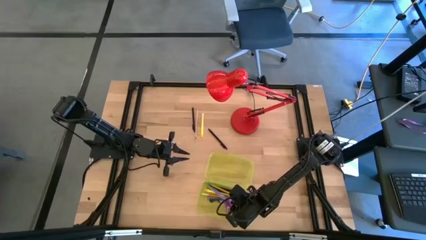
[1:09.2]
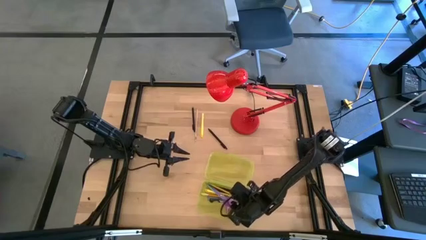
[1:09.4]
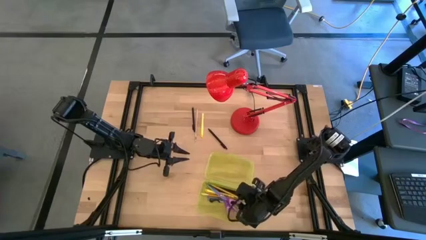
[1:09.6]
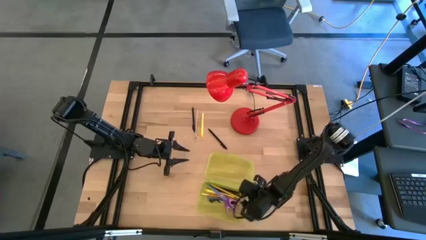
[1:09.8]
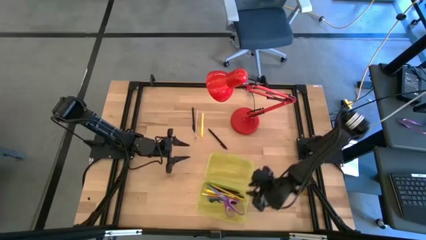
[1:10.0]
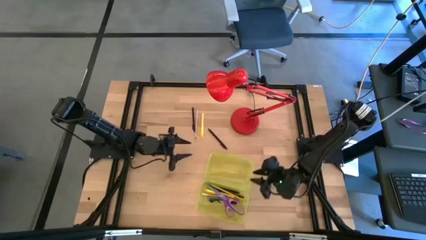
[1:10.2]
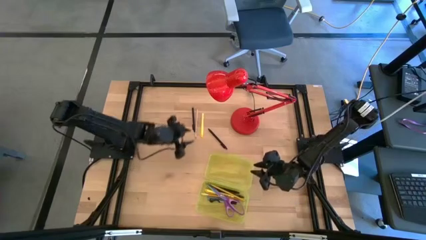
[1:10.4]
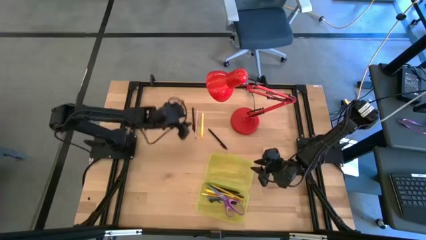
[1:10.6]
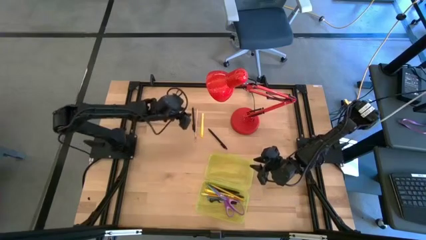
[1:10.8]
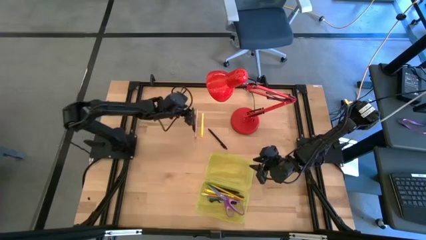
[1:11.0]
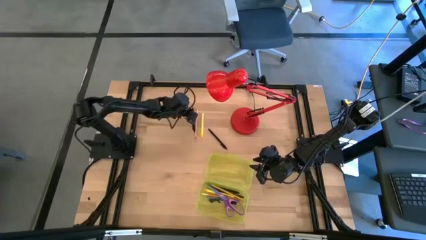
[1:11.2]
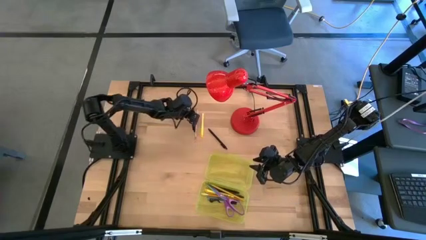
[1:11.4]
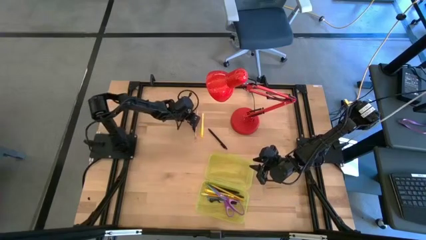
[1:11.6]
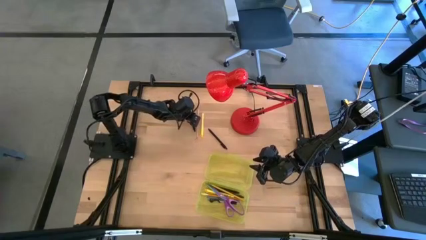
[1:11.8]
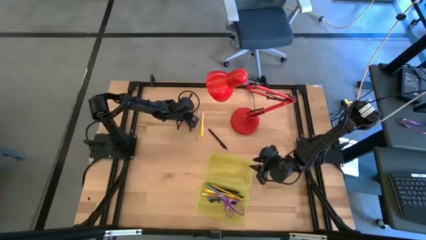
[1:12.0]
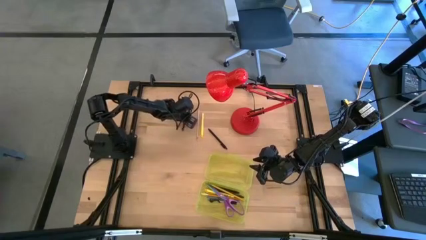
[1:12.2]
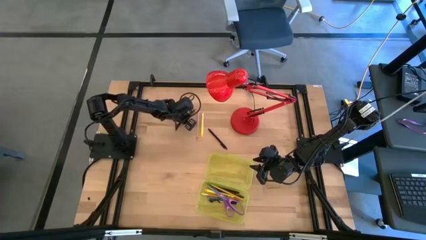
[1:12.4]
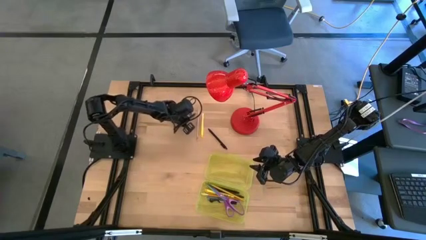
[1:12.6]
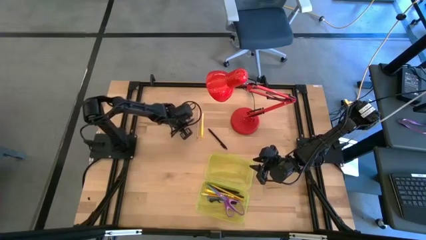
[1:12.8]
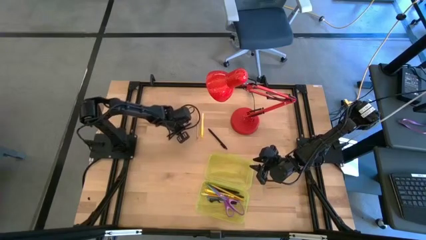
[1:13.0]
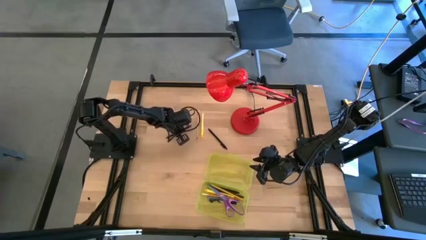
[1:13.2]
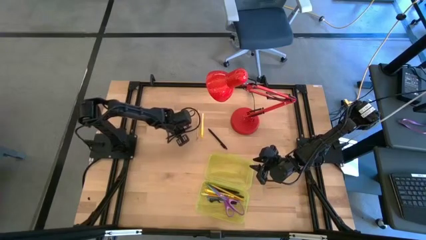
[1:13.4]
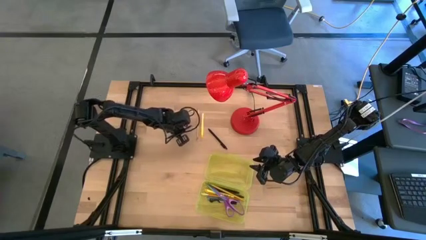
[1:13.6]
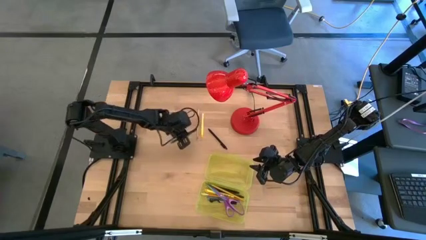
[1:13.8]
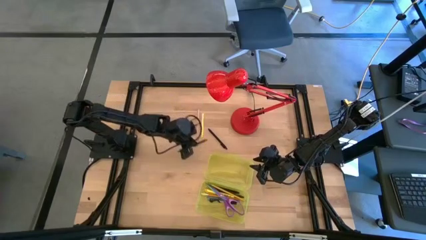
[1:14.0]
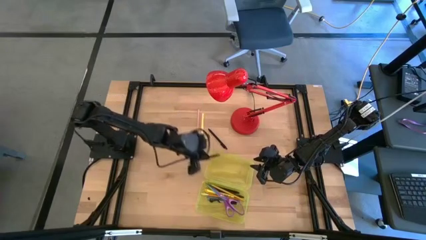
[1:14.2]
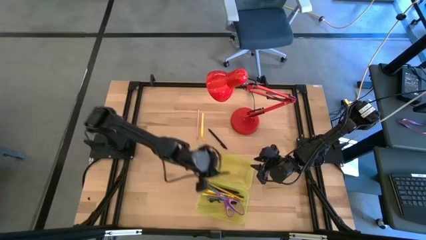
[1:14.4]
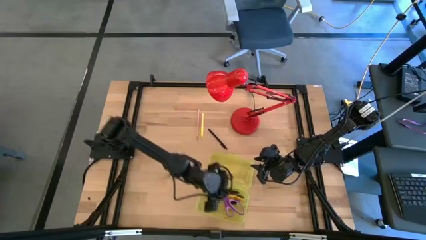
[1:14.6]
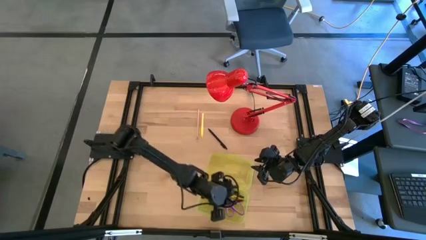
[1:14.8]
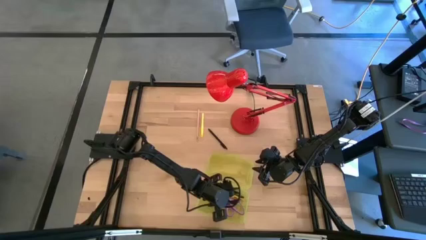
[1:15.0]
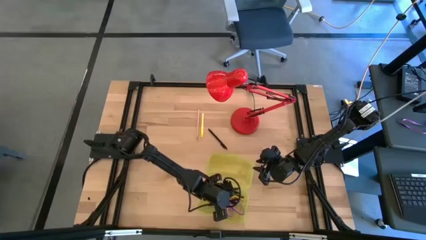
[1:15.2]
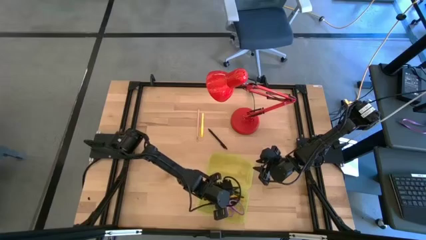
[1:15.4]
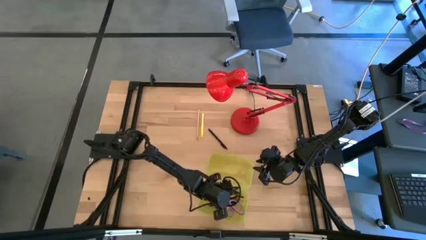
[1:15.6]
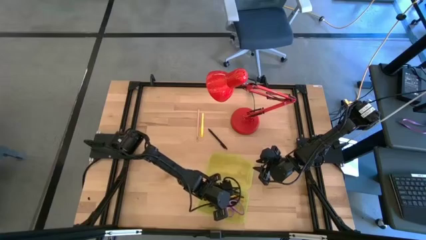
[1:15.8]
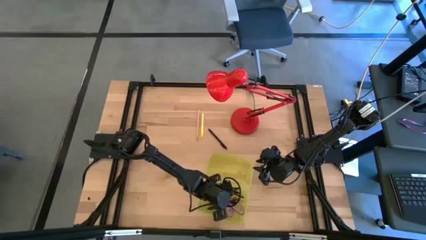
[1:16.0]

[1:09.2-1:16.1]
Task: Pick & place school supplies into a supply box
Put the black pen into the yellow supply box

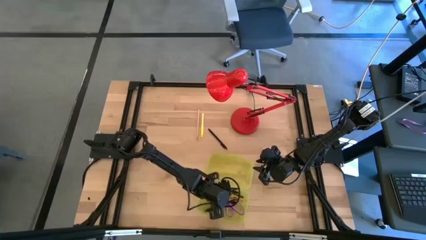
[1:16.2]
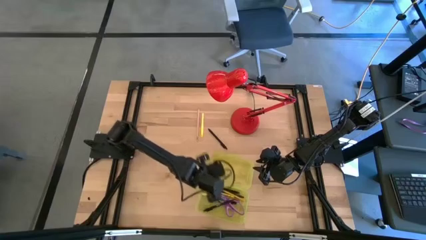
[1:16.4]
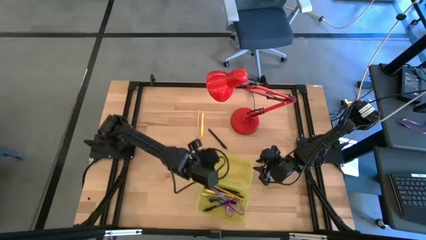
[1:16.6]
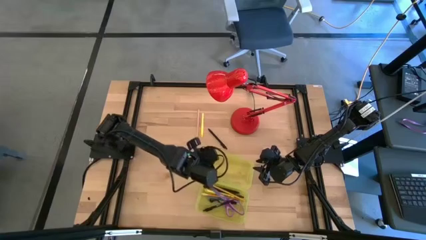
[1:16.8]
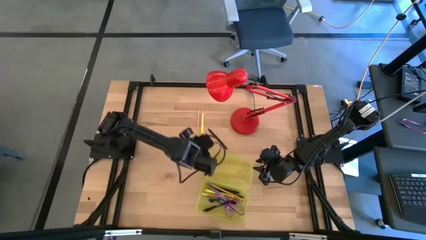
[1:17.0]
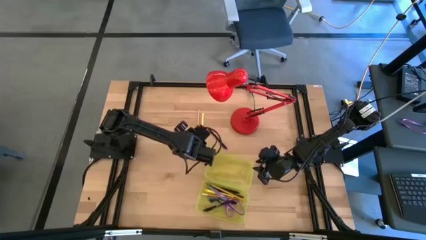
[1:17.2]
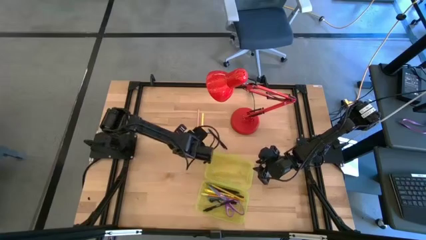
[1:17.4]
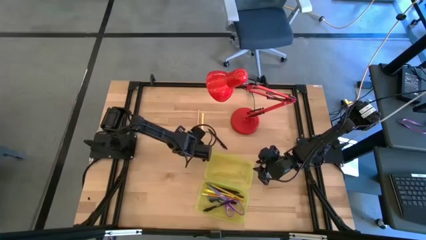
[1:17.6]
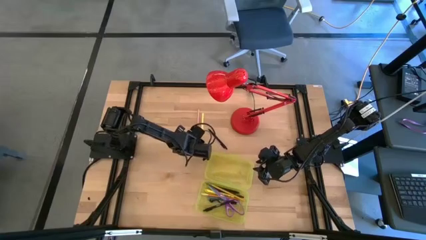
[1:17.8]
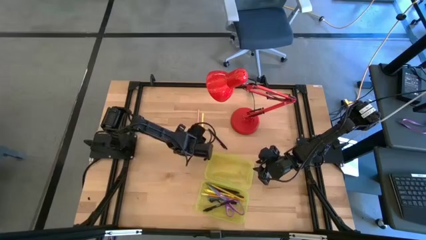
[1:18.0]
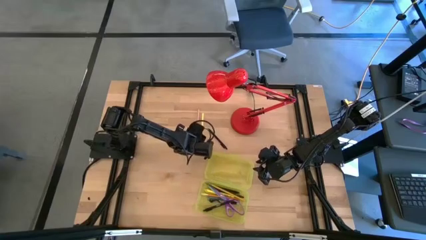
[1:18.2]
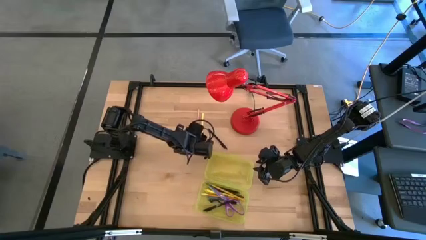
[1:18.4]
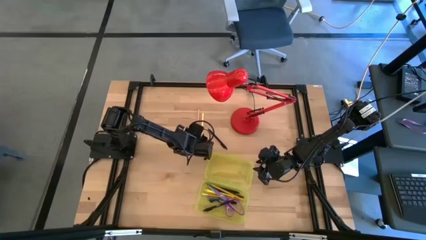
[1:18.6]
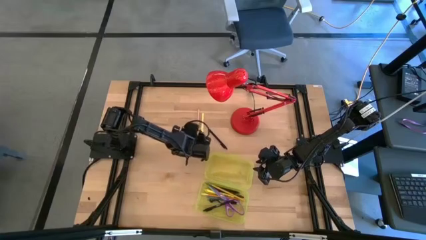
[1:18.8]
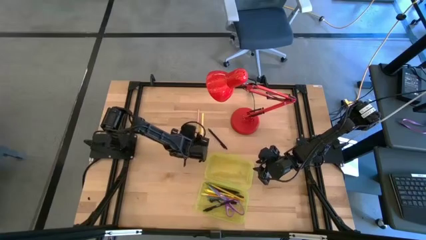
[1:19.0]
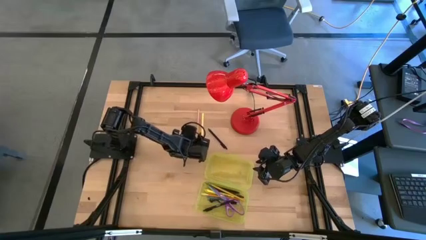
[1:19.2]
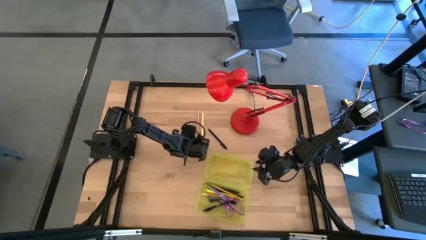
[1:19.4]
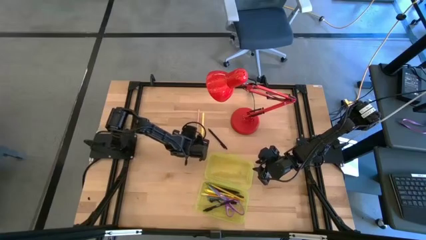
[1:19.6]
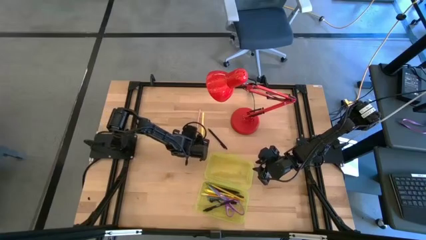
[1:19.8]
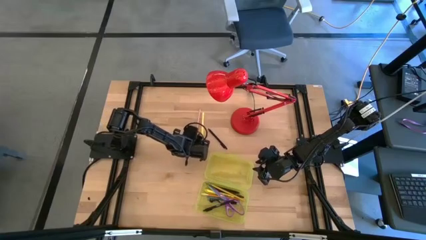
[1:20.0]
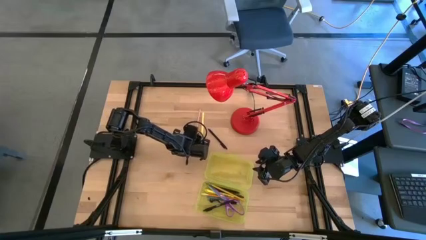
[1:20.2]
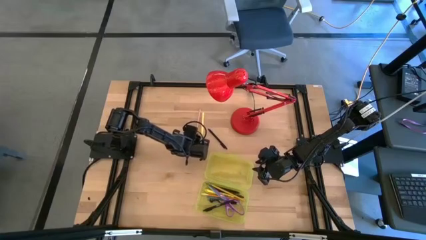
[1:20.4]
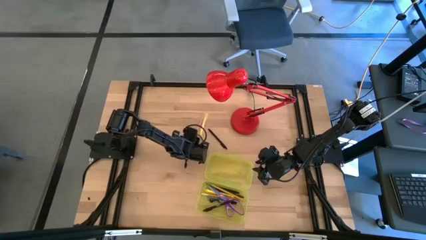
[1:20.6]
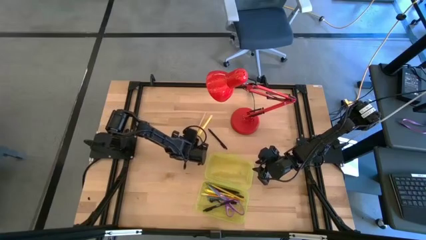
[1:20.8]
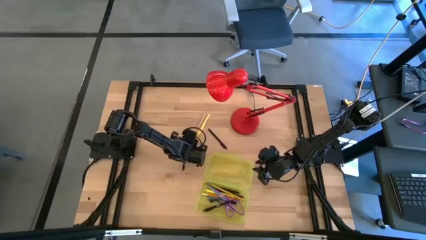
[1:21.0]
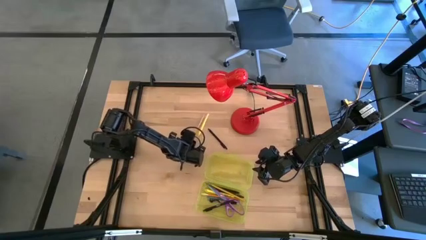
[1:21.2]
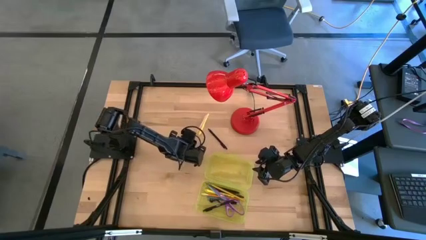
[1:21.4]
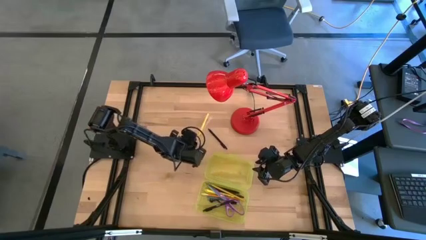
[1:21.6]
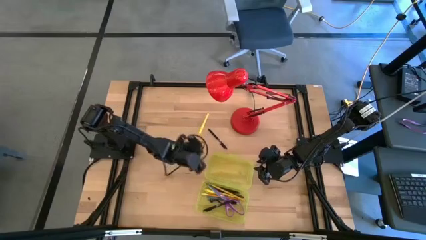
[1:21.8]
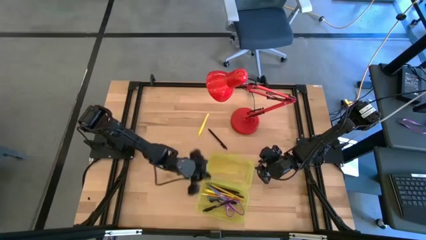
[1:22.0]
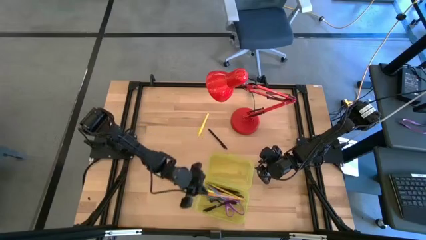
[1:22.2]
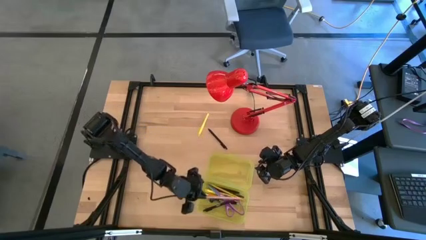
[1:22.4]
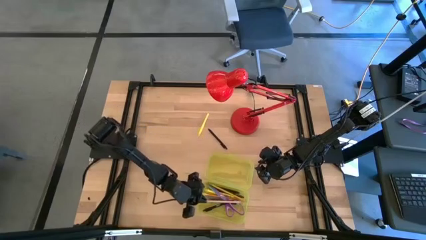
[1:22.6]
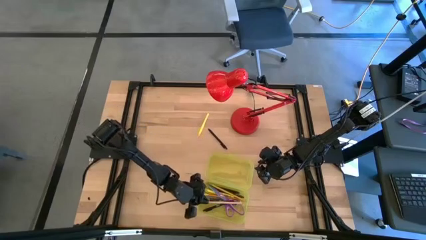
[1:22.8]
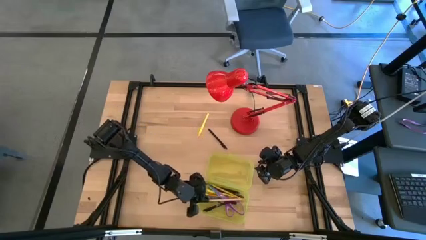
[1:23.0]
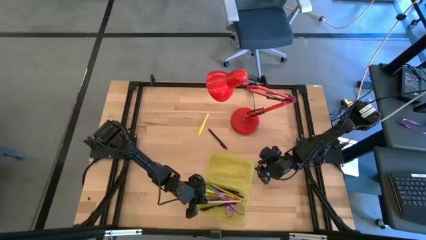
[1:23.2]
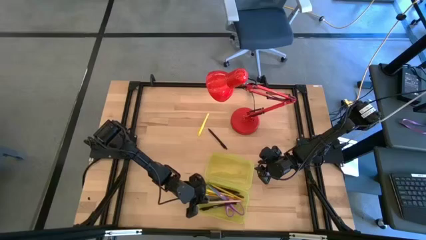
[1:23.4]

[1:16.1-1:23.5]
Put the pink pencil into the yellow supply box

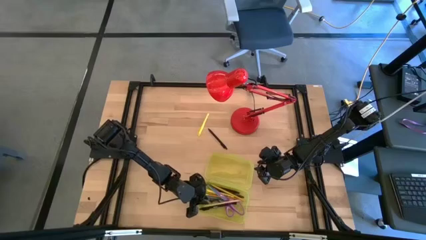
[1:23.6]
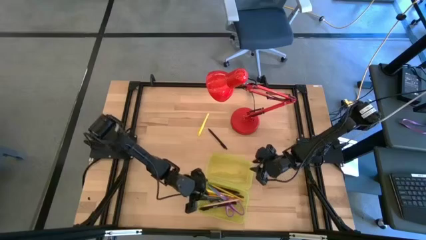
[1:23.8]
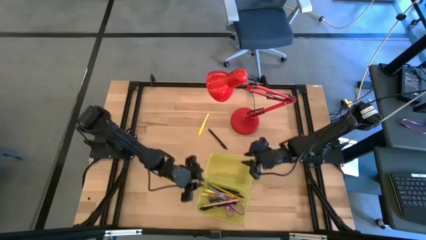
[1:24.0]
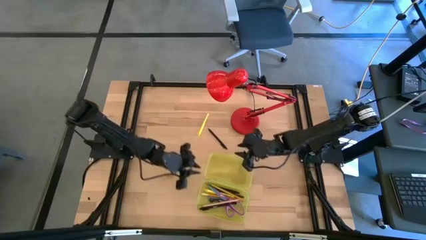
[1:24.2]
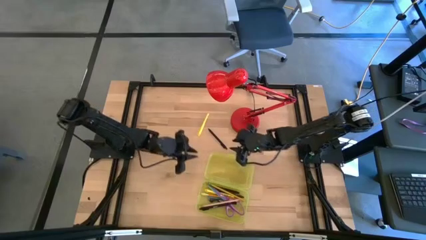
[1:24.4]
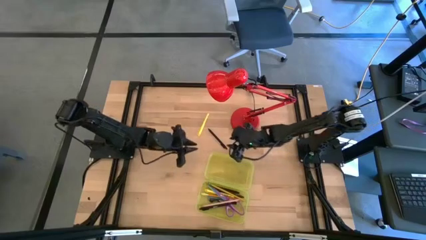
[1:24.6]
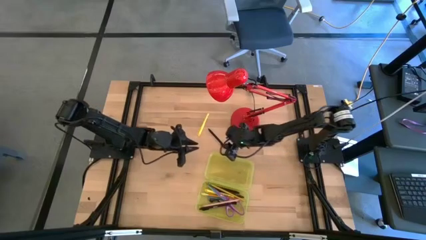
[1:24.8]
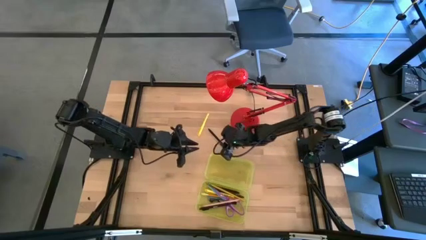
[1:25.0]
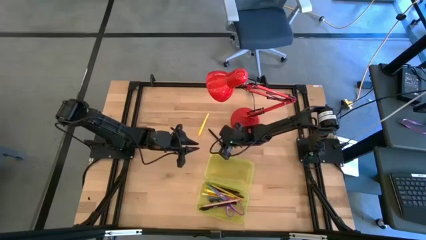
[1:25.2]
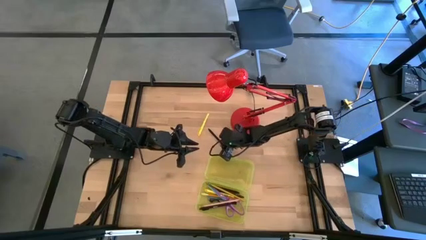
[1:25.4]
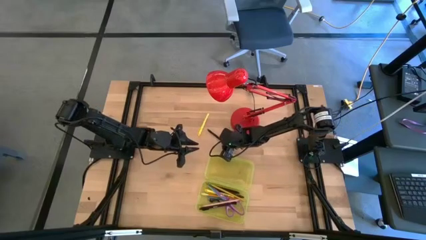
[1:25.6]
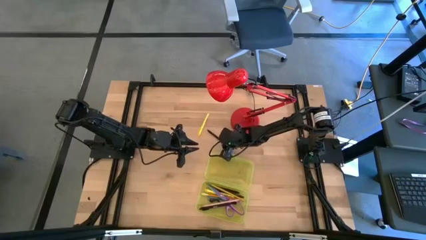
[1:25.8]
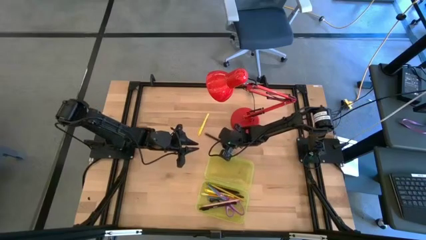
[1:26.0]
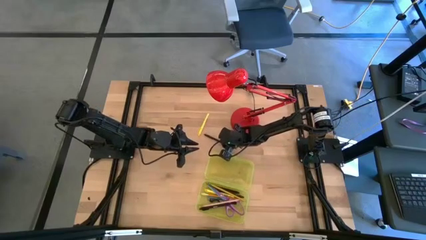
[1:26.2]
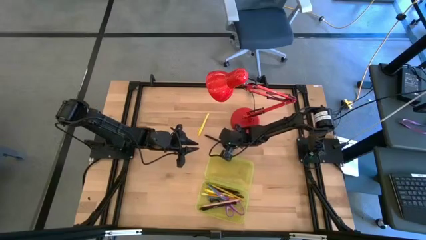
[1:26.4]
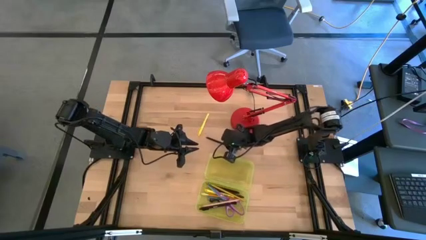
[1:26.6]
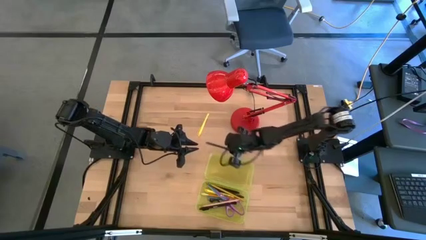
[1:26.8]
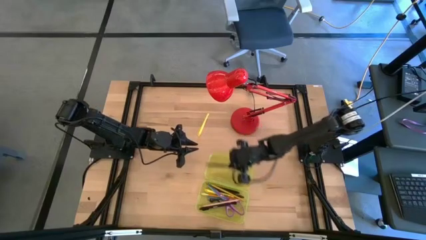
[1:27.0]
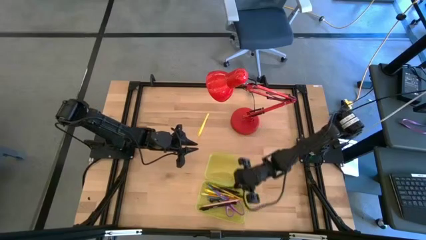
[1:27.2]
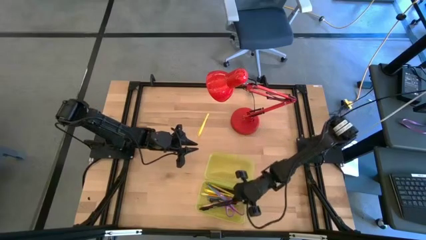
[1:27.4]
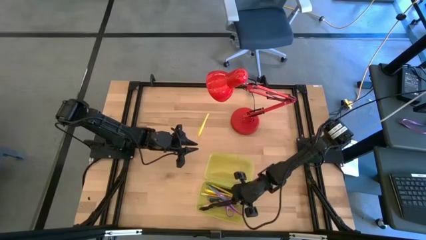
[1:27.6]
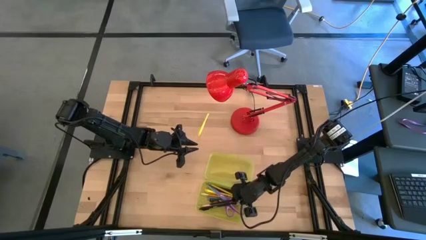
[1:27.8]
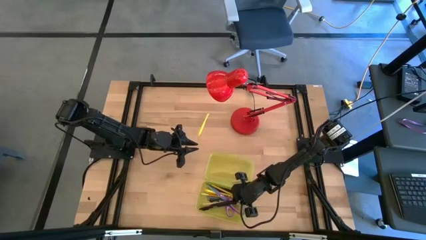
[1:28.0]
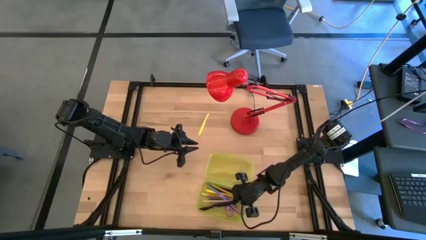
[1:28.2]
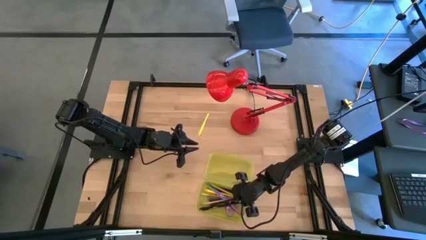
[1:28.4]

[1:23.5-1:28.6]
Put the black pen into the yellow supply box
